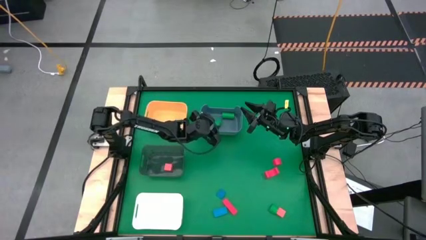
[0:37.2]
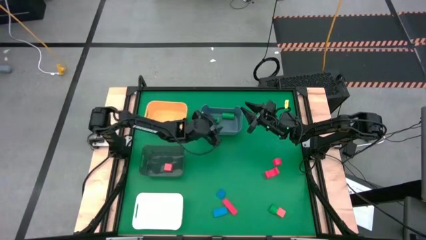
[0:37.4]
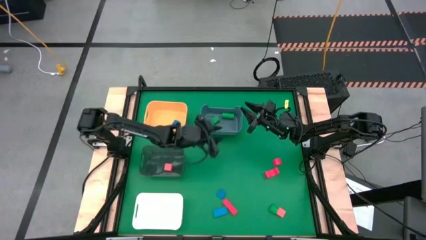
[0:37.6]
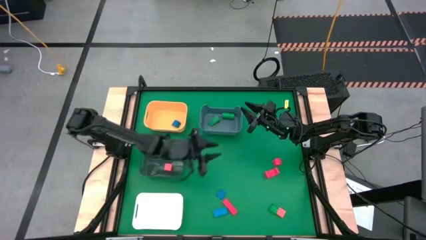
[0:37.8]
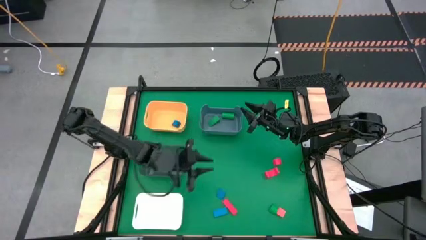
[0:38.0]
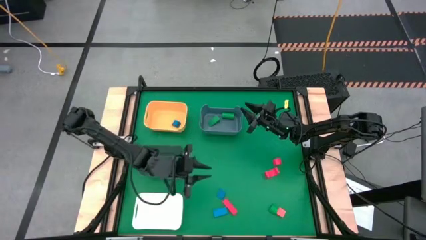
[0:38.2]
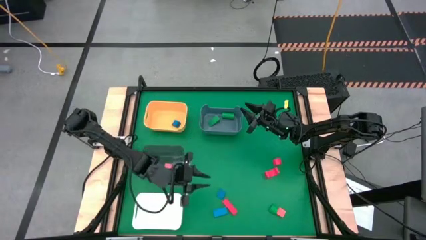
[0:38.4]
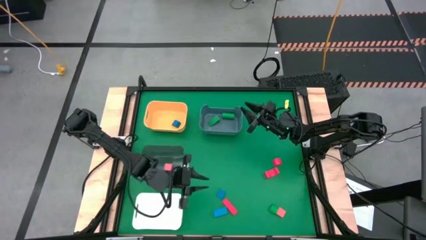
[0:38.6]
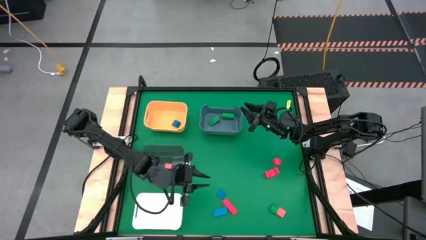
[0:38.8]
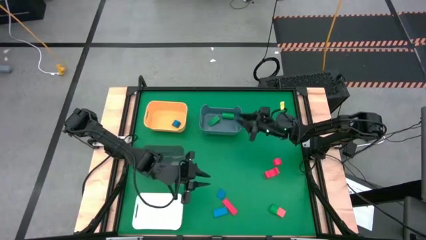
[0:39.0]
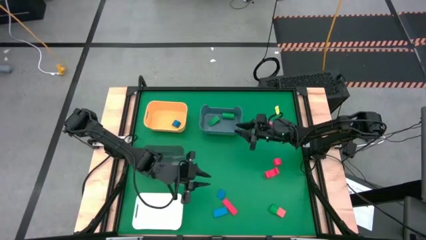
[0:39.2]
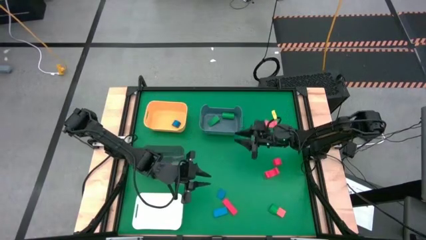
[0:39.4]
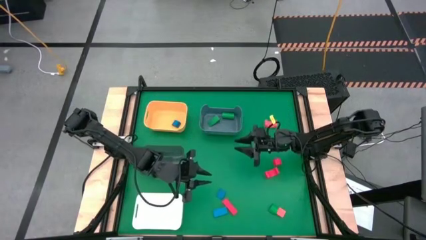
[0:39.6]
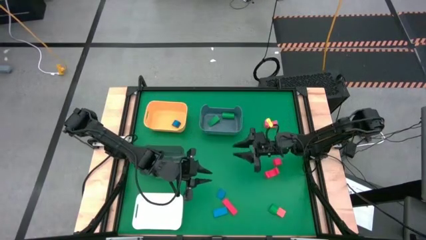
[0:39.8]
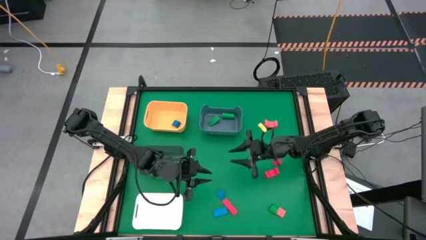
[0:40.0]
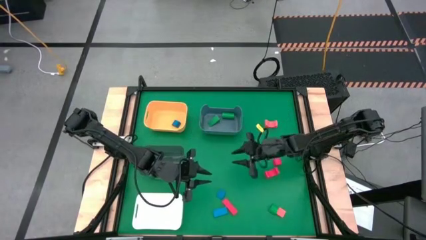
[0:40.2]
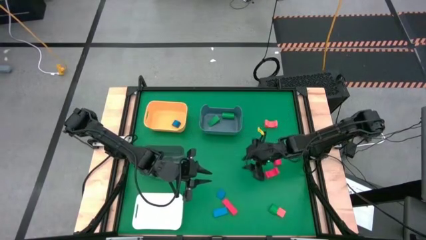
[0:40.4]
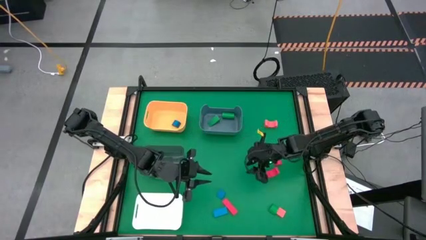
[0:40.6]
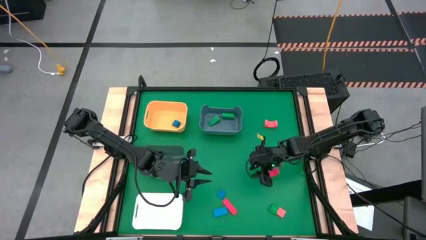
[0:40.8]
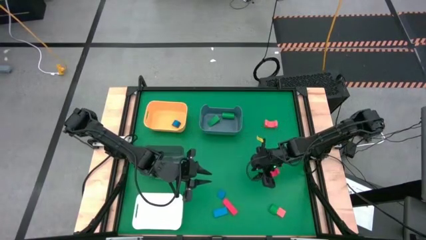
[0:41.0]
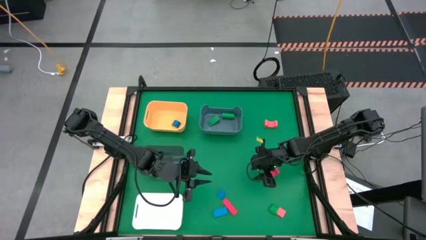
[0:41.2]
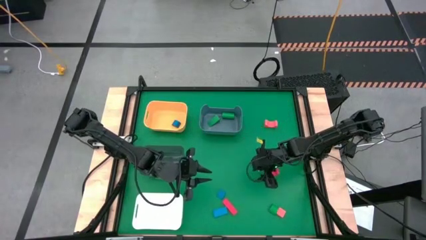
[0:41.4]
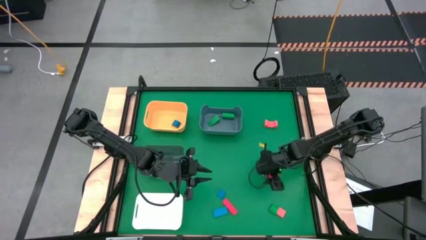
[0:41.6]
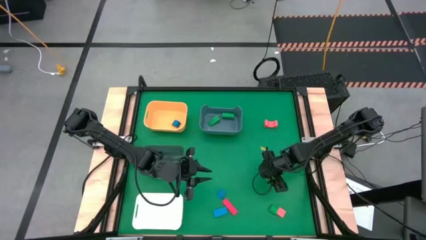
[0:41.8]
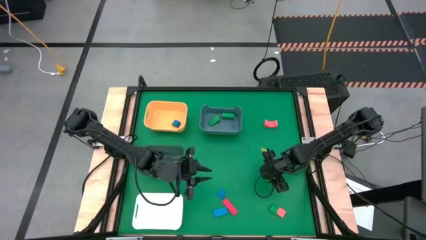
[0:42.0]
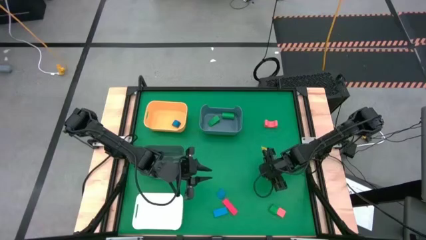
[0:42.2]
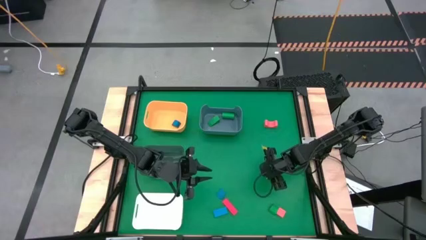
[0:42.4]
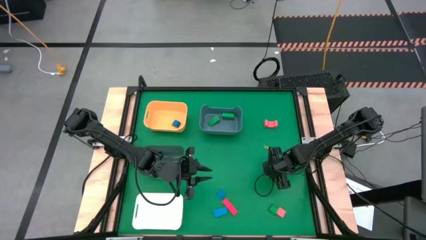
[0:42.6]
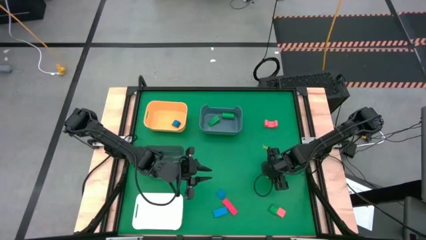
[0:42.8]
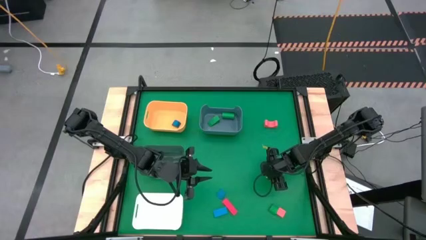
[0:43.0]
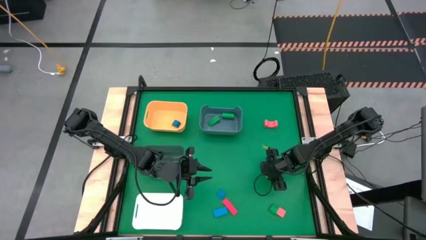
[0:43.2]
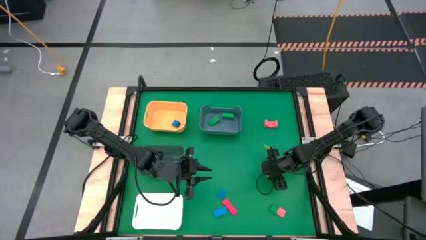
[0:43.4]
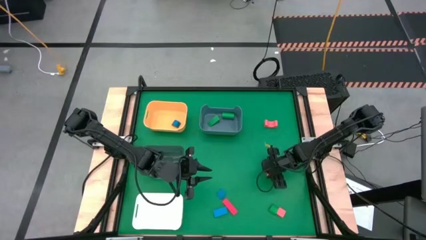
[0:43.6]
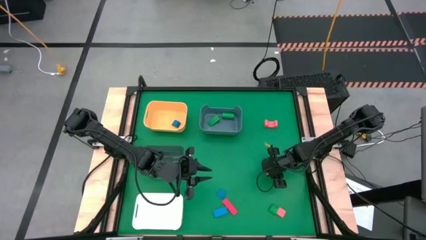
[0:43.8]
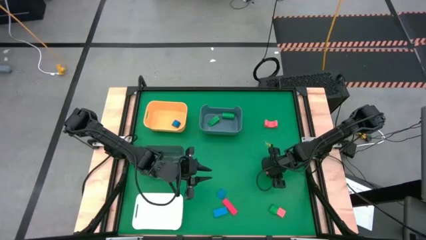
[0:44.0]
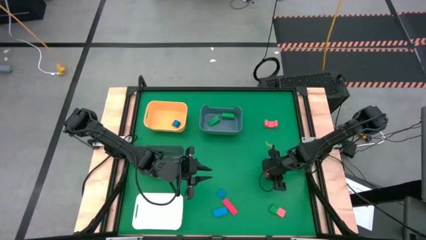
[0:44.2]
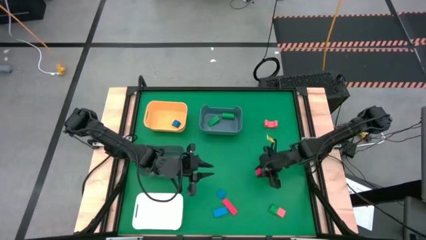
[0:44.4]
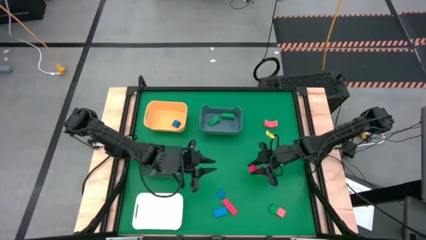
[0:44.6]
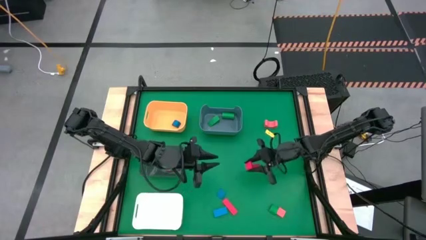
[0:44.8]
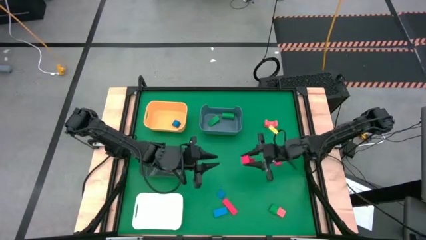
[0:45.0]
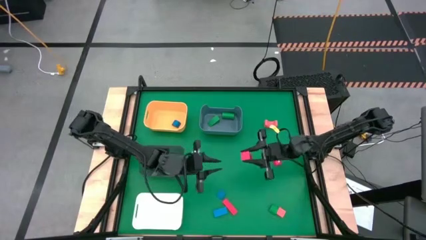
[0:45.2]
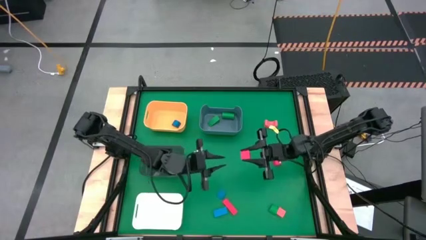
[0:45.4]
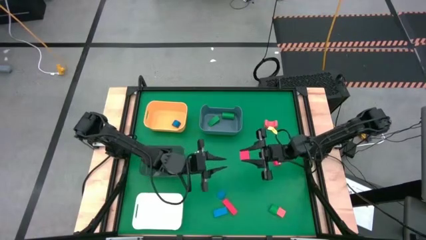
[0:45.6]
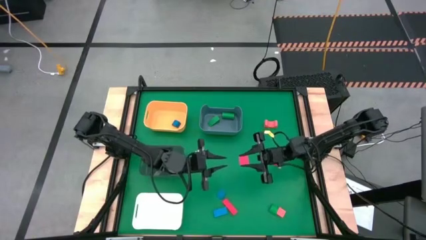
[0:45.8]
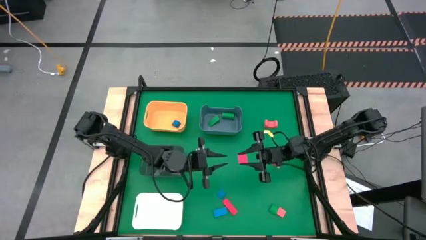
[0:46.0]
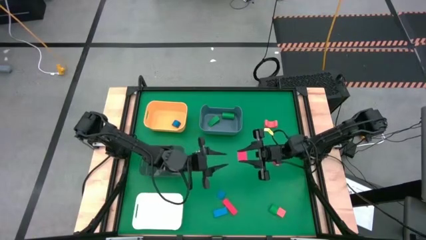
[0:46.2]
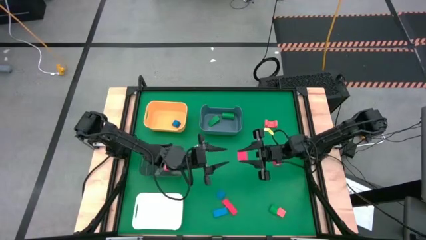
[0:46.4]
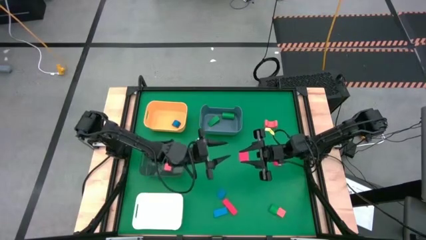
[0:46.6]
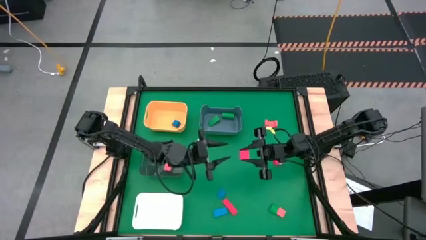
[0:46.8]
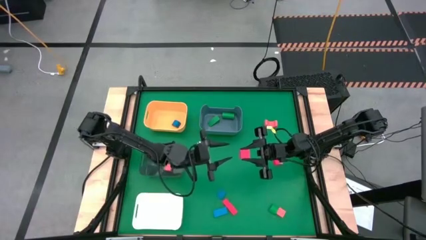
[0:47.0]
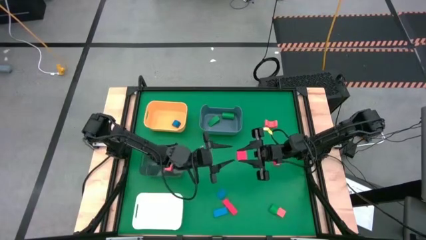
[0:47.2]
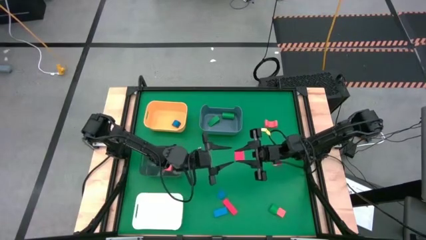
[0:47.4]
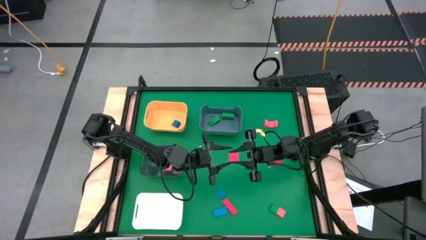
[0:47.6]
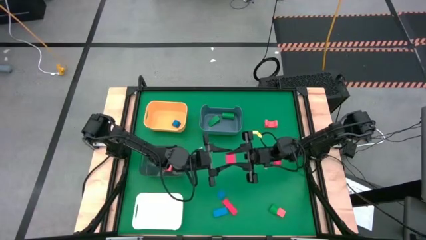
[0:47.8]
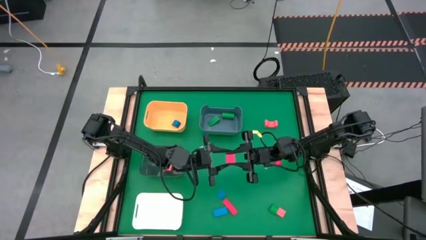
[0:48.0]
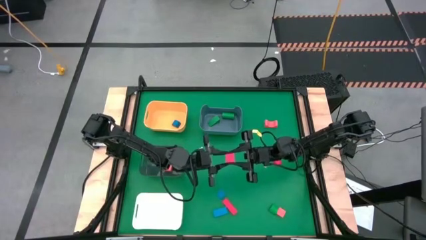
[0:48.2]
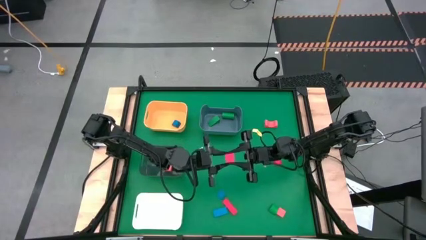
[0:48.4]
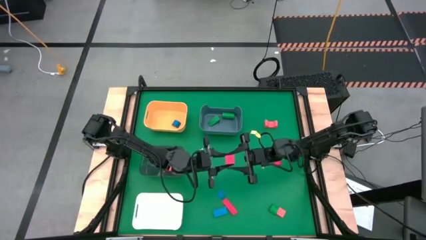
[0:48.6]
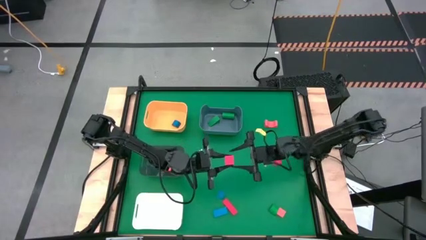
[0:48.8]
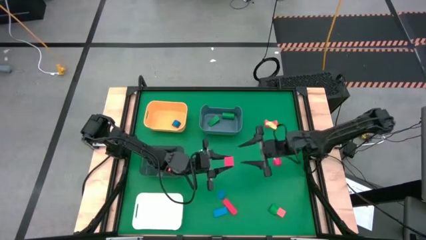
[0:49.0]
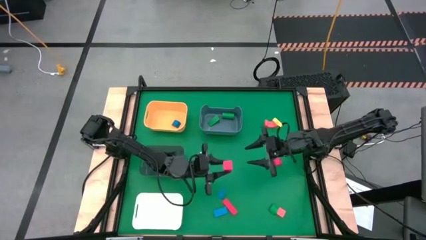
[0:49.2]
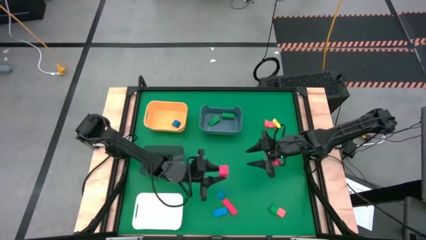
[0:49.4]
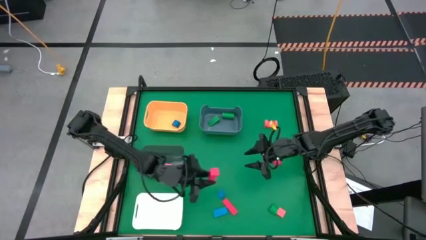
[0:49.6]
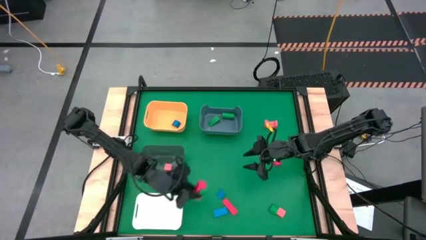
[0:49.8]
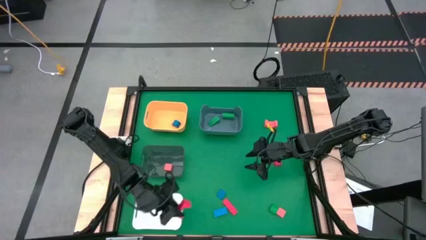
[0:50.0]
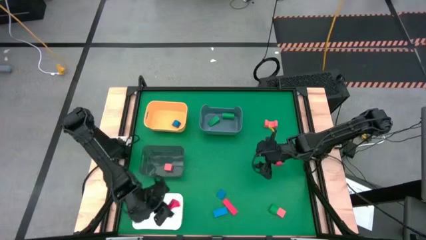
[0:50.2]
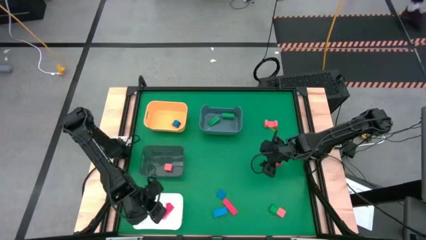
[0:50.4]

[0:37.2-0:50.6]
Task: Sort & place blocks by color
Put the red arch block into the white bin

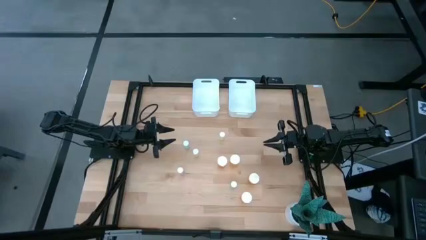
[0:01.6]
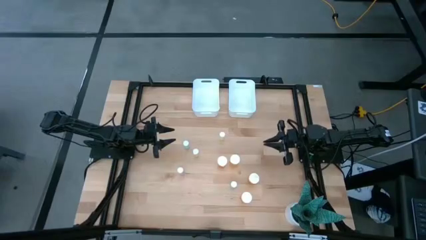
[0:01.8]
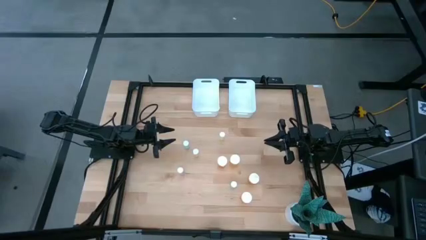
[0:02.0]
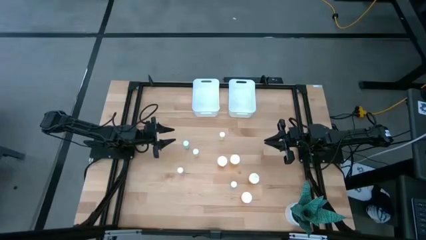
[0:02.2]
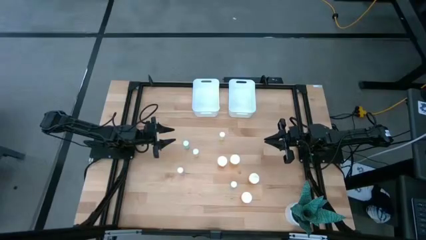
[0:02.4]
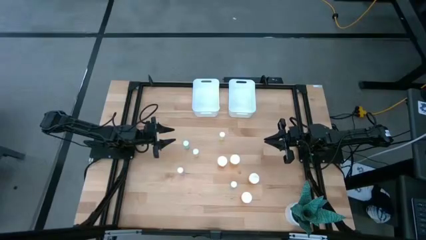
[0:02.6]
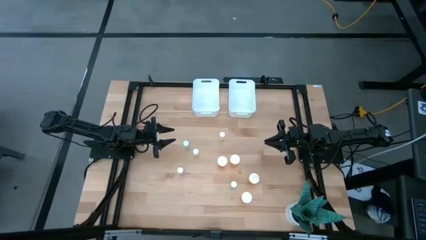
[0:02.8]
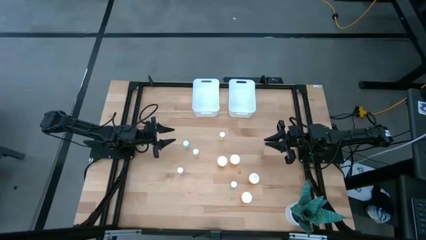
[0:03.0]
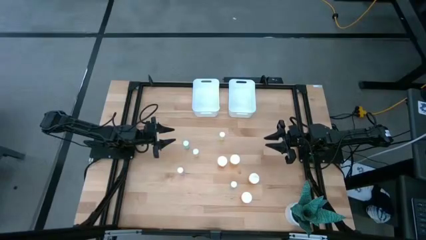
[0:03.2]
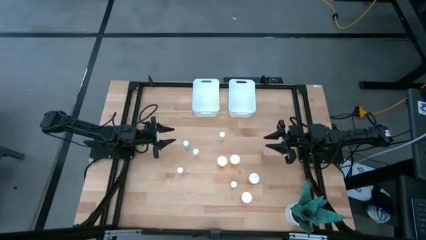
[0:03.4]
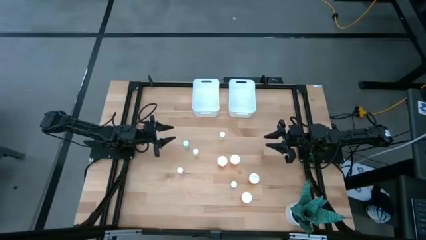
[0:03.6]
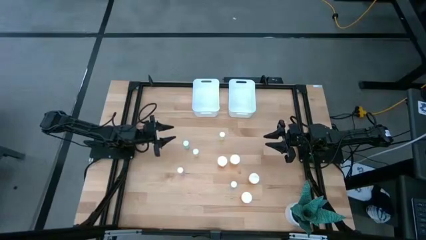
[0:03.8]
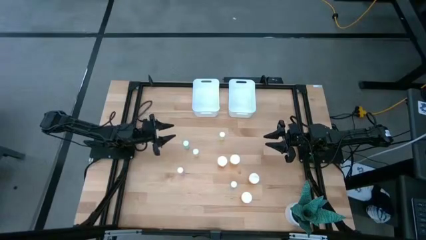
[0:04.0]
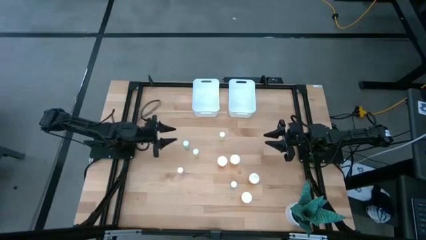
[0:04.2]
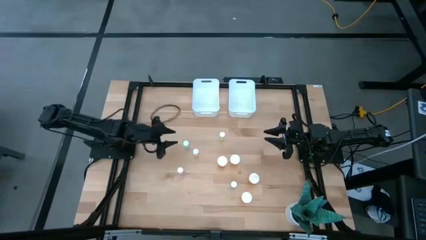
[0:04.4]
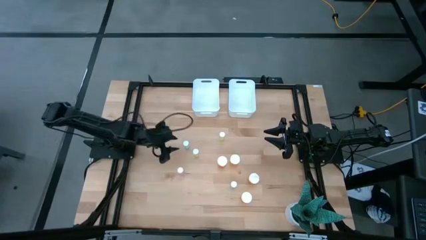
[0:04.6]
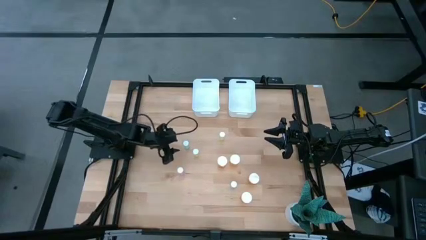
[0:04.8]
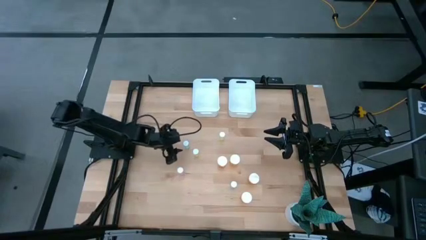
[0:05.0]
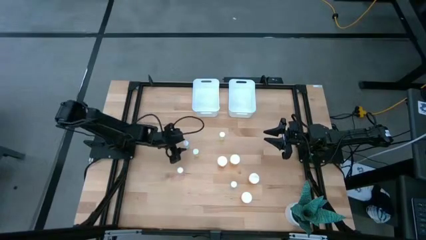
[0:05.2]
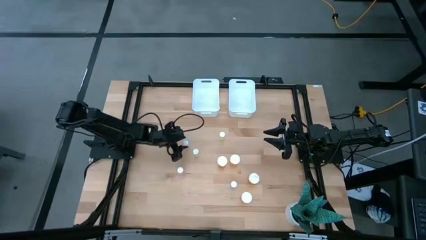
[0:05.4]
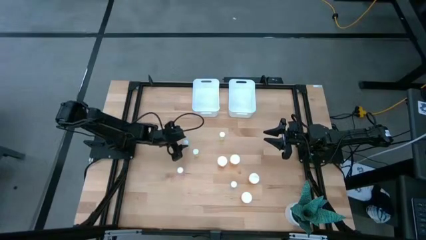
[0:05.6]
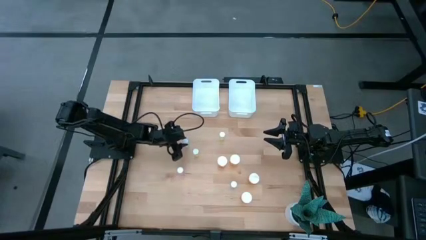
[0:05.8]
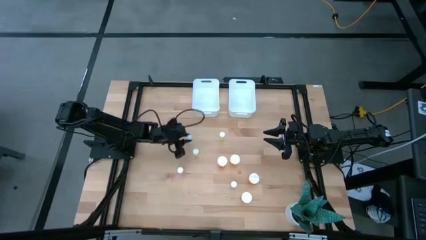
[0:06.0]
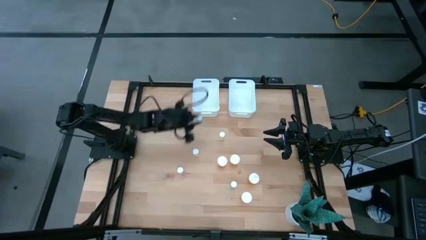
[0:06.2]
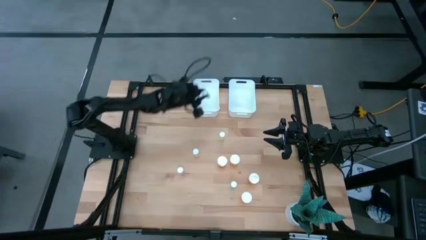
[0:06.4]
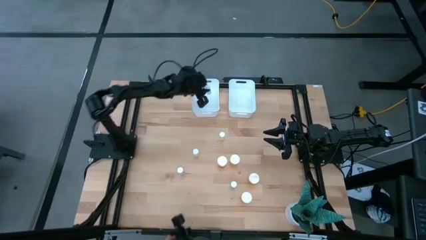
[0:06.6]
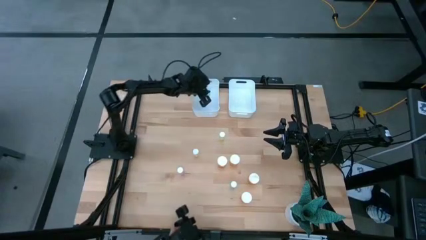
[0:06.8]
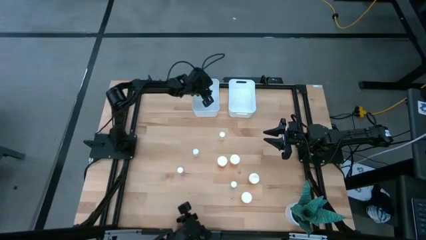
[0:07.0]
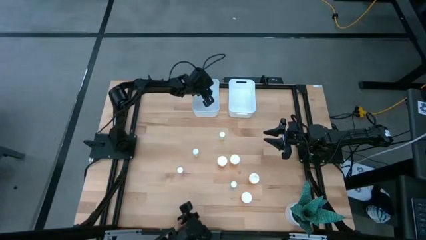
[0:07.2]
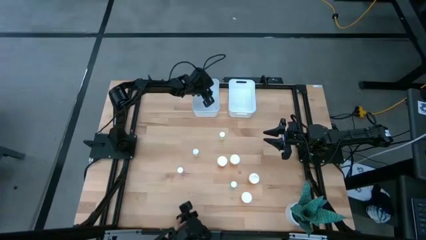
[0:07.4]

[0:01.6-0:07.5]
Task: Pick and place medicine bottles into bin by pill shape (circle, oval)
Put the top blue tablet bottle into the white left bin
